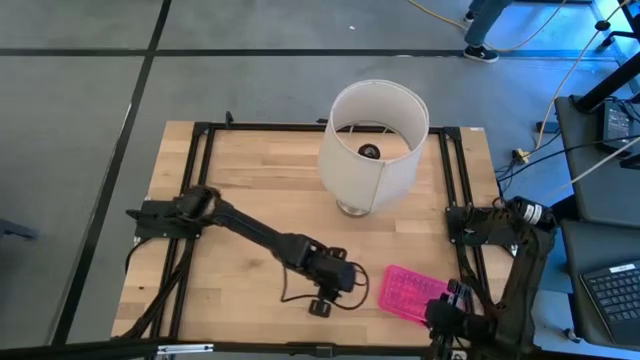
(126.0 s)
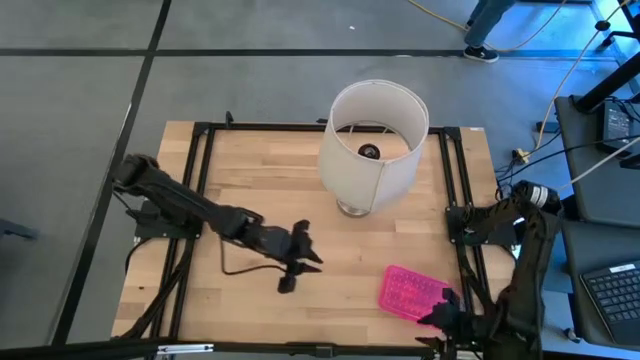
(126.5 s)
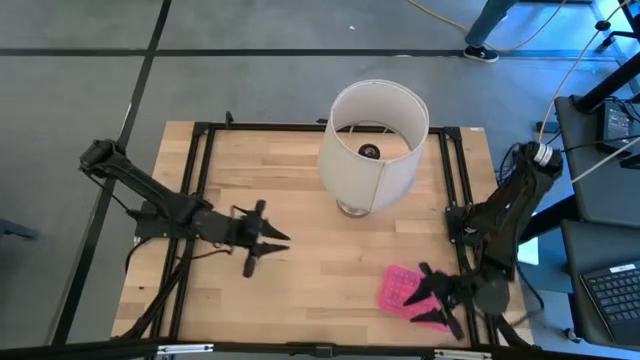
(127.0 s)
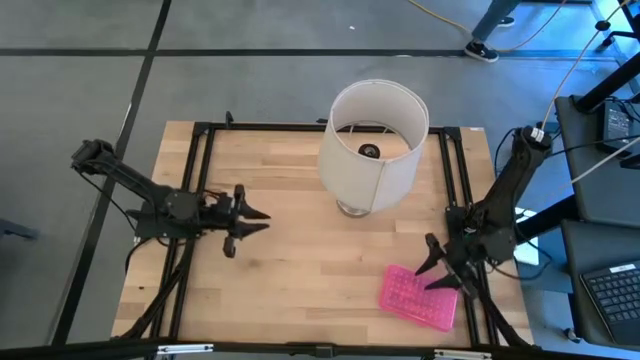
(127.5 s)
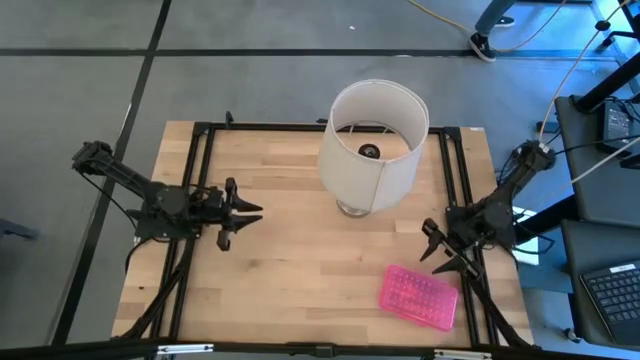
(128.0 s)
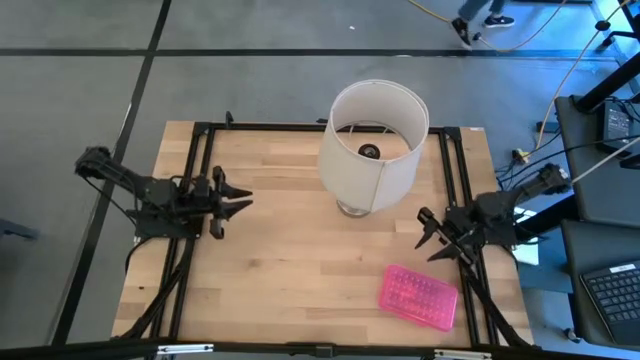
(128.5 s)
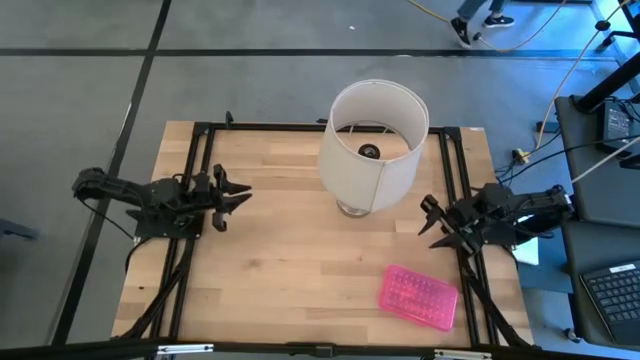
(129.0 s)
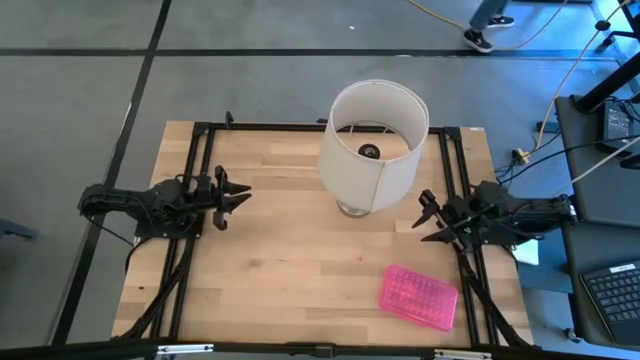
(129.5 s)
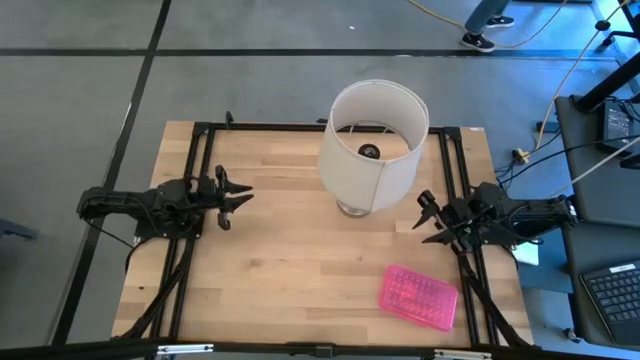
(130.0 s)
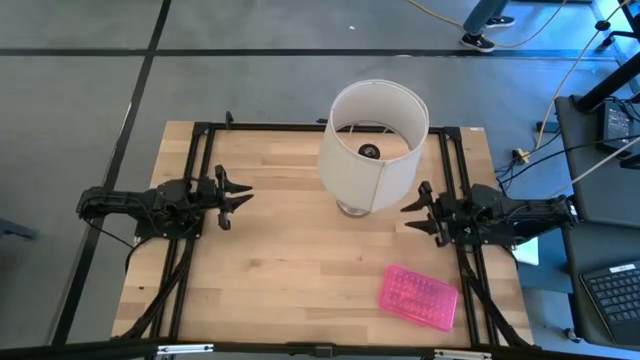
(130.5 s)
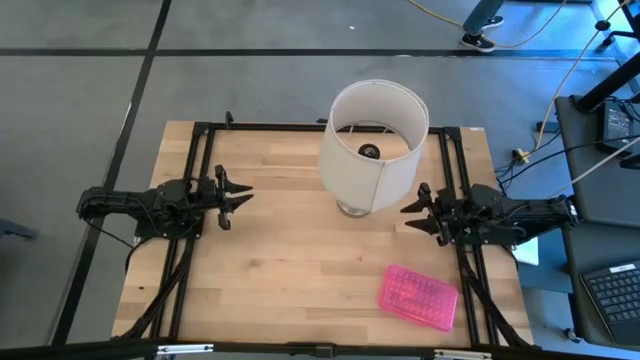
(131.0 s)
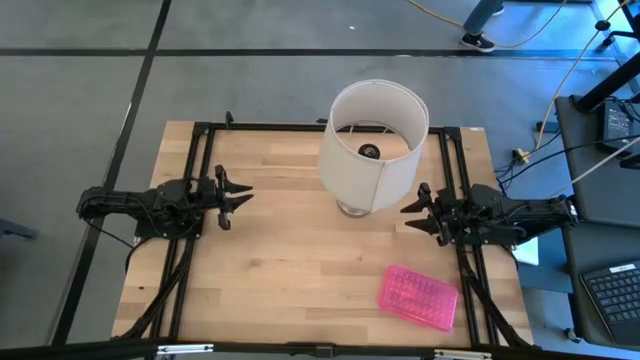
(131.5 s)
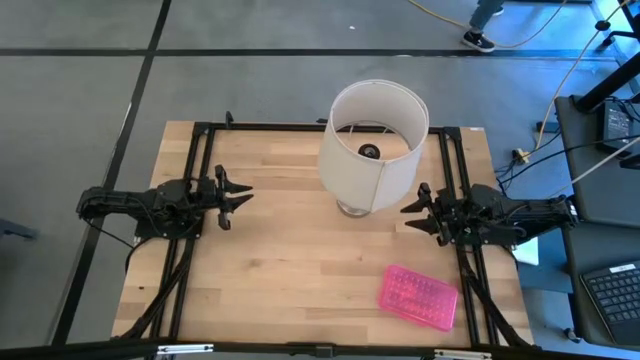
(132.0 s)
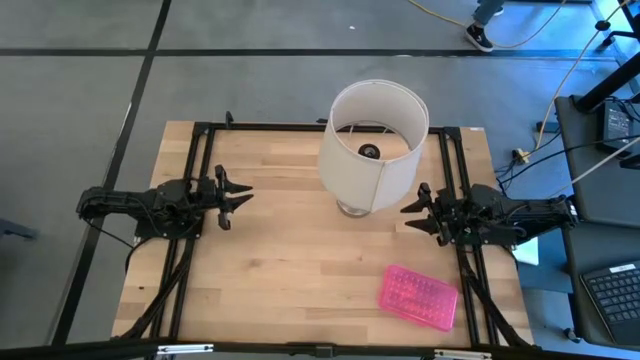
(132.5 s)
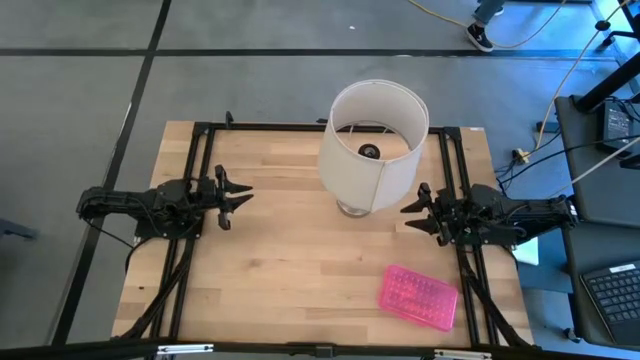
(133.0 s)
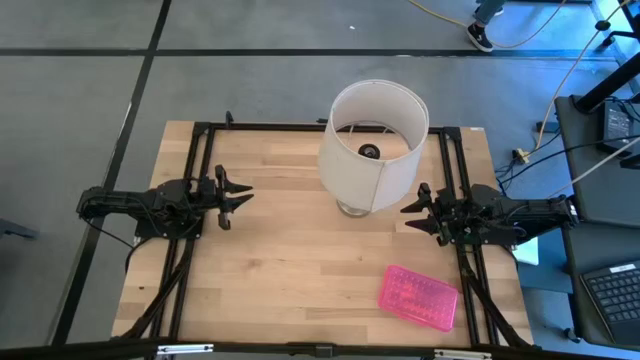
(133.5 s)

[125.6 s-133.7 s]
Task: Pick & place school supplies into a supply box
Return to Home Position

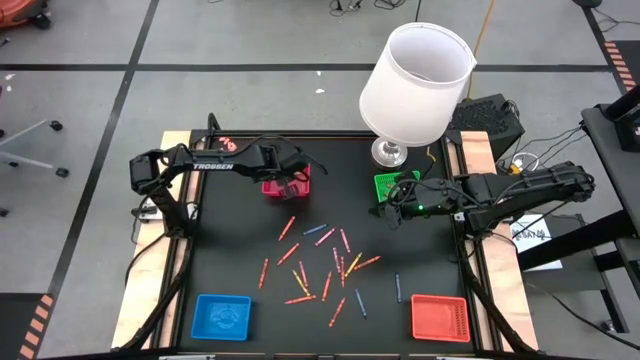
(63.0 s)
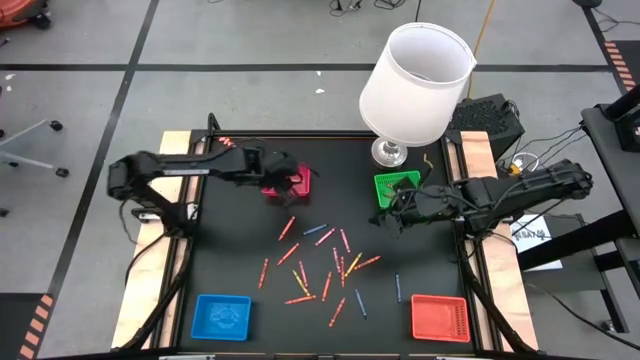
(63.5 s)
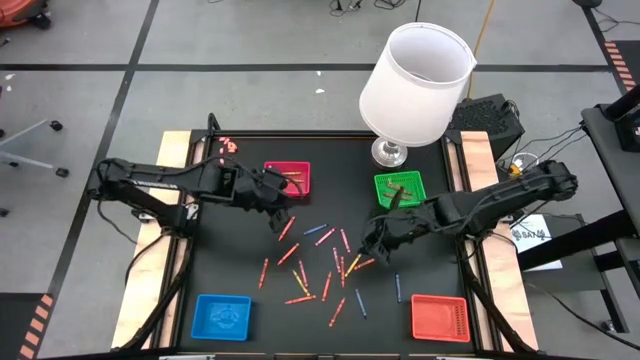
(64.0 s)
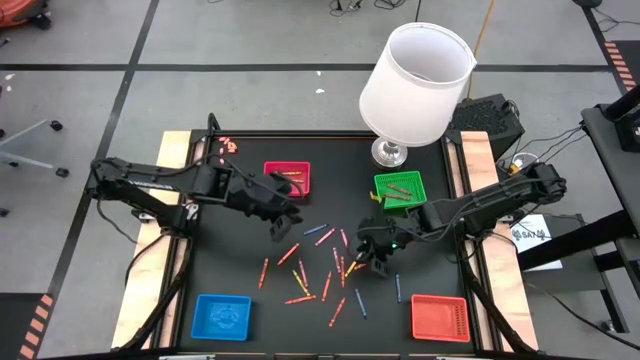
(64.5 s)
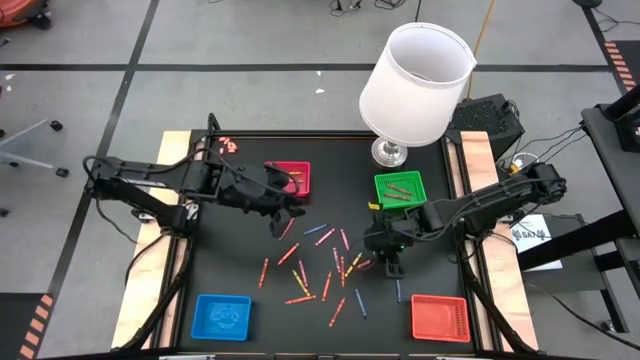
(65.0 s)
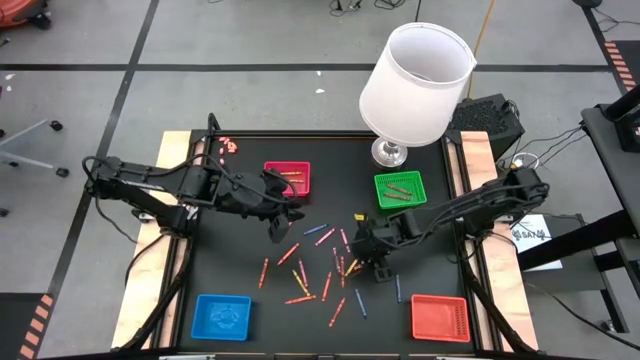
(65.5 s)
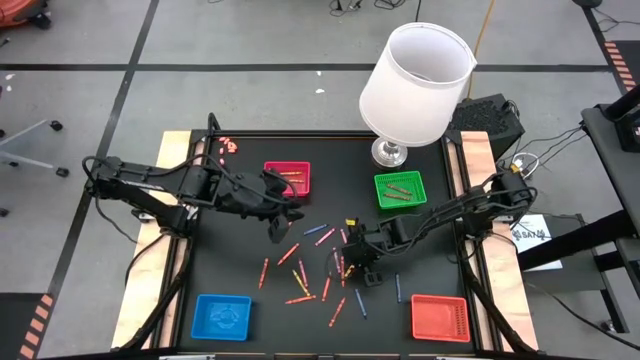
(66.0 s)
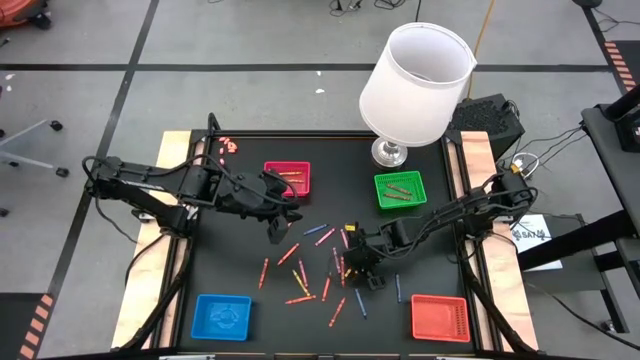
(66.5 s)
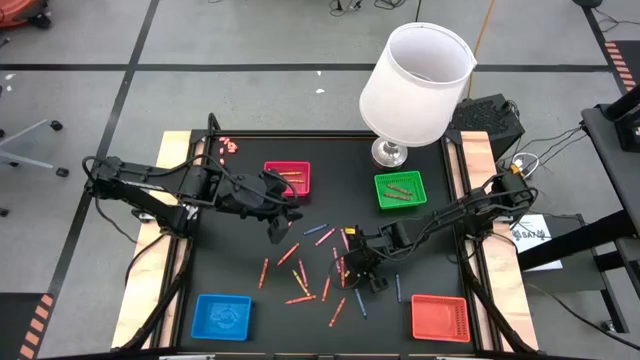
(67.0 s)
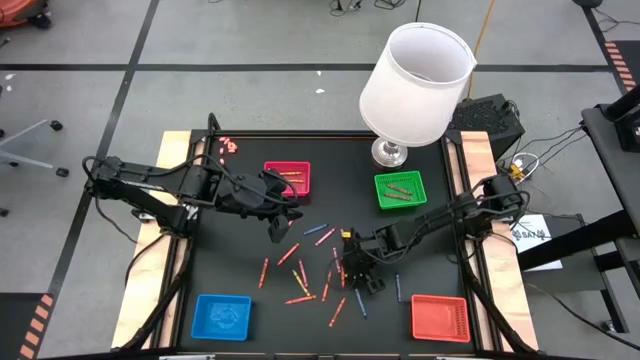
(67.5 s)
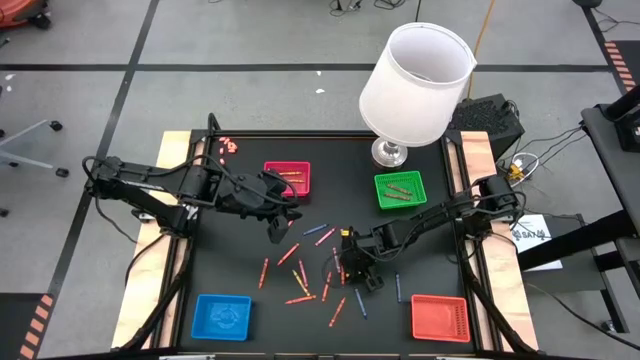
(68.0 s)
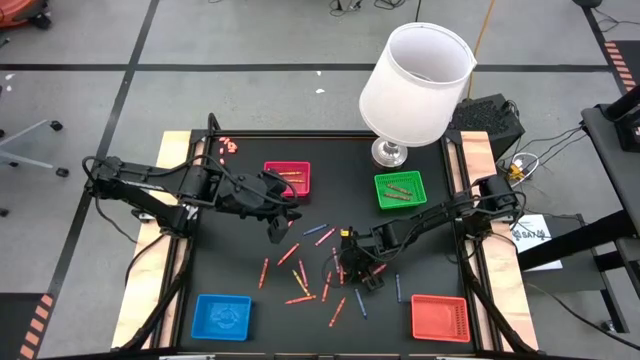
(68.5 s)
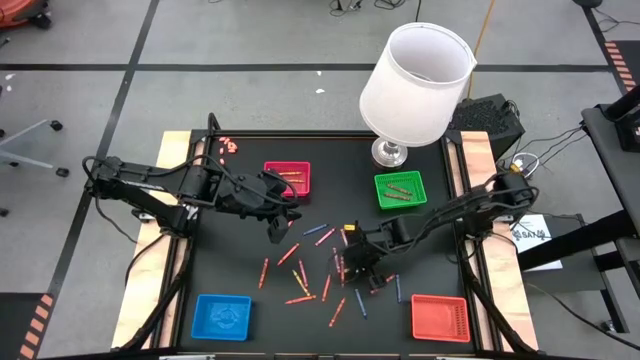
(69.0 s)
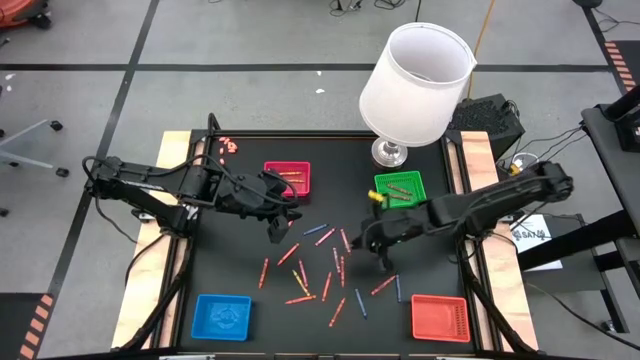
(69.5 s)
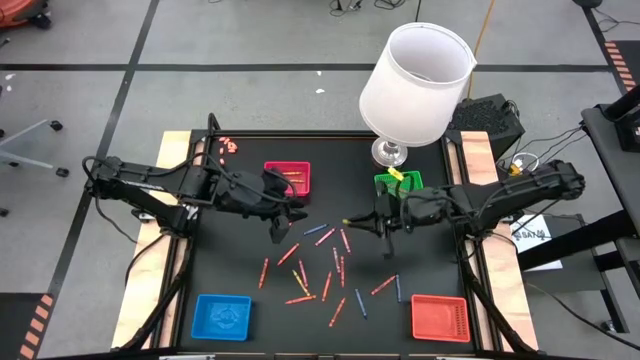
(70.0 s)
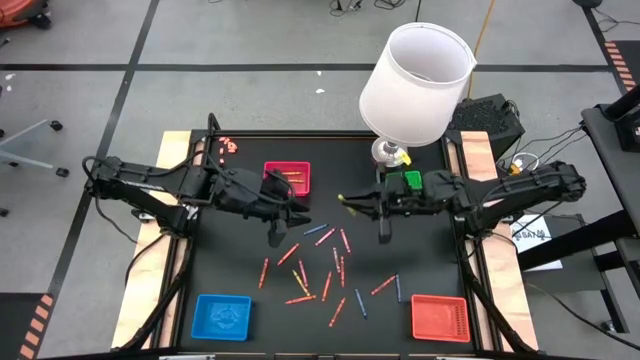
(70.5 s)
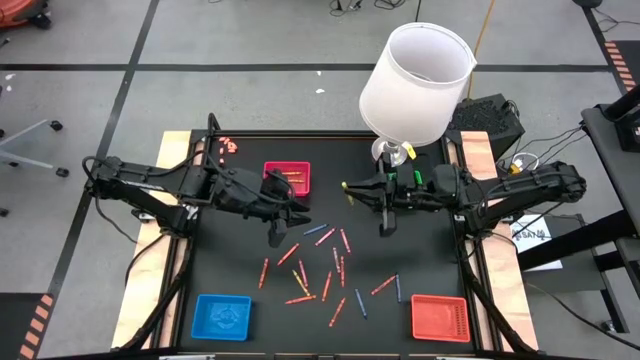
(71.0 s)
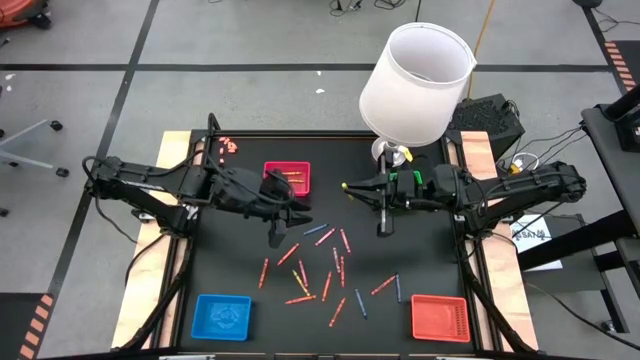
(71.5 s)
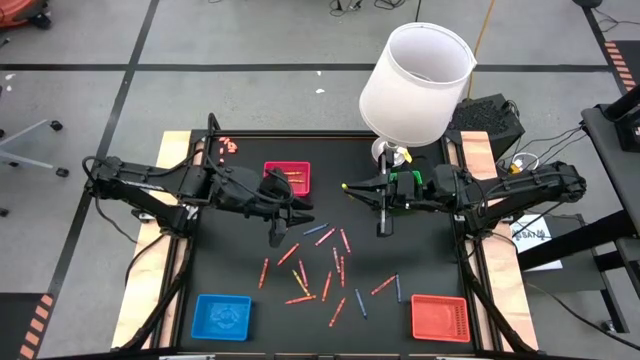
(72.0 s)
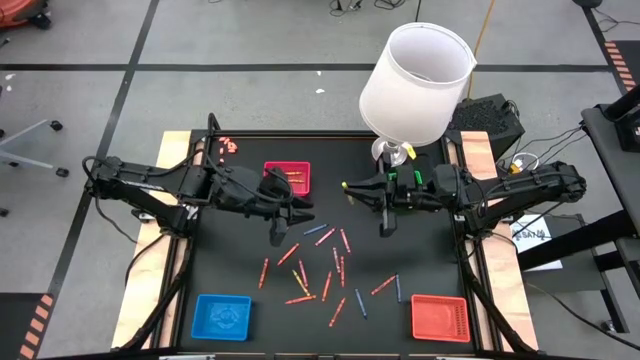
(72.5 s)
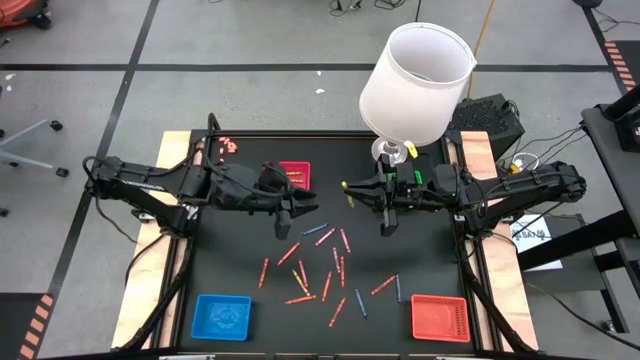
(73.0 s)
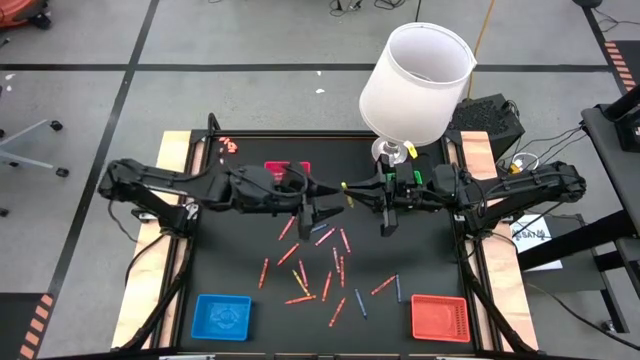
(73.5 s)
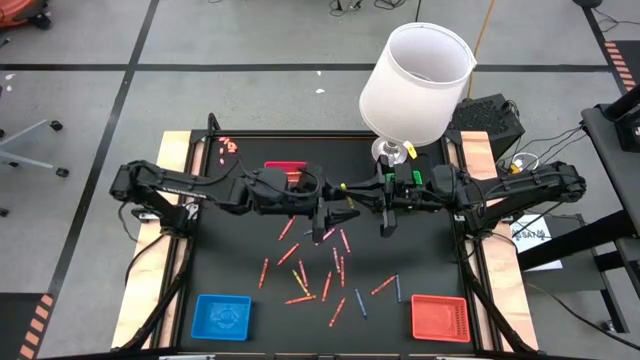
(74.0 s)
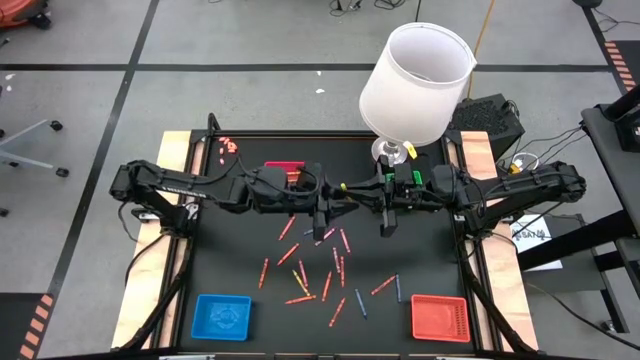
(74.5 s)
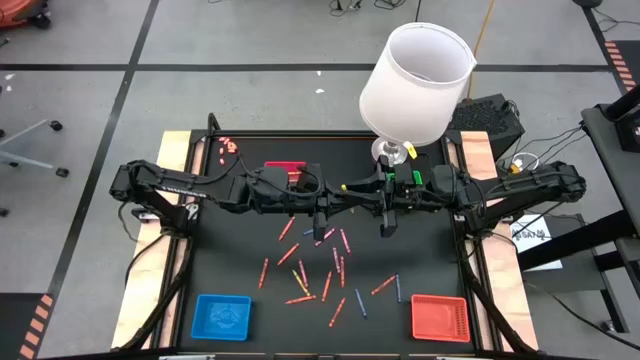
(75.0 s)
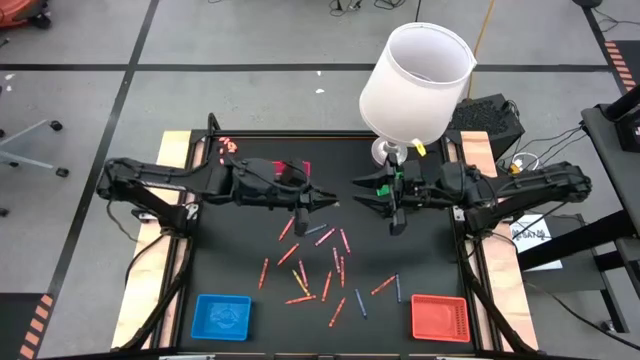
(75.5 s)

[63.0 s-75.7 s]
Task: Sort crayons
Put the yellow crayon into the red basket
